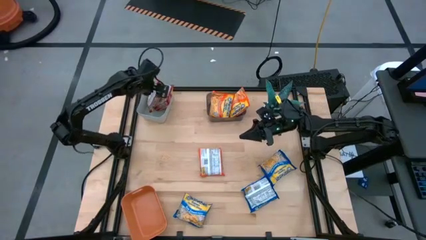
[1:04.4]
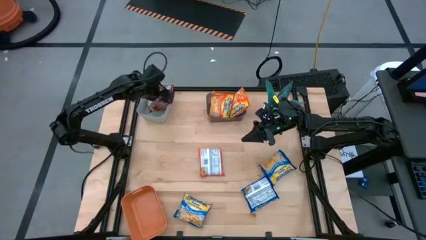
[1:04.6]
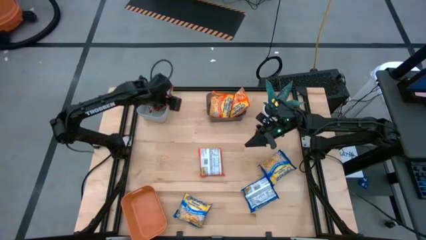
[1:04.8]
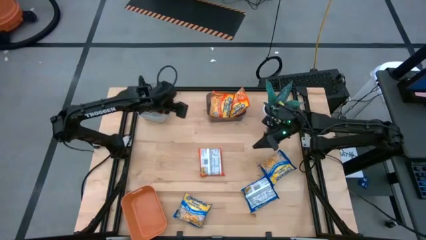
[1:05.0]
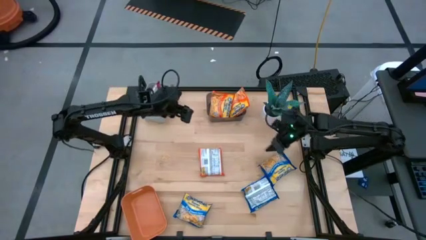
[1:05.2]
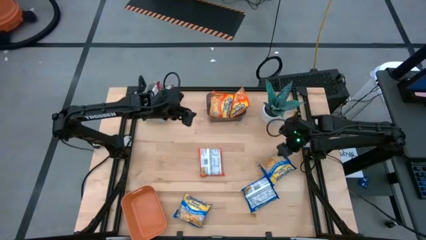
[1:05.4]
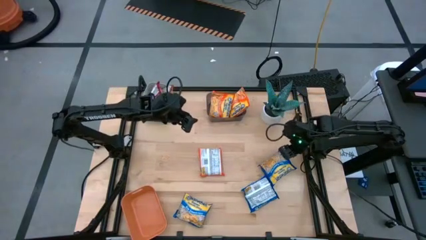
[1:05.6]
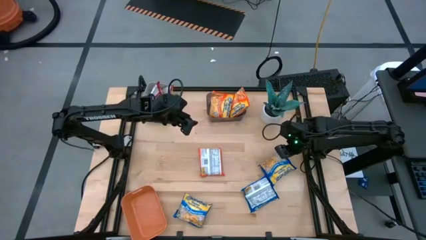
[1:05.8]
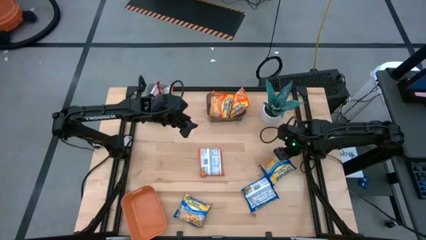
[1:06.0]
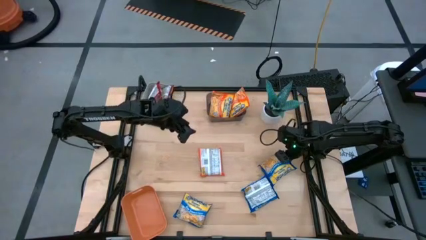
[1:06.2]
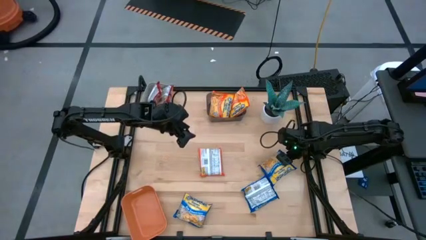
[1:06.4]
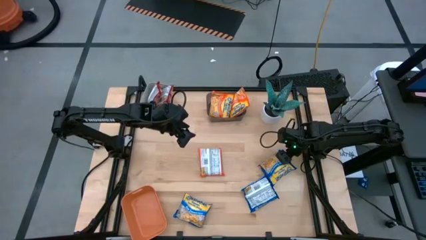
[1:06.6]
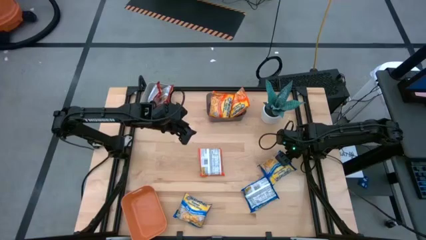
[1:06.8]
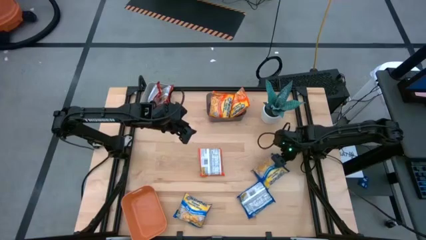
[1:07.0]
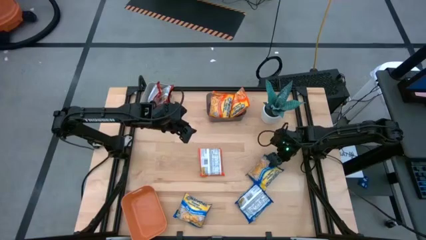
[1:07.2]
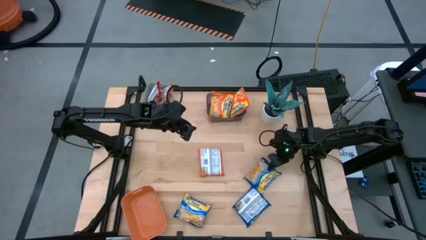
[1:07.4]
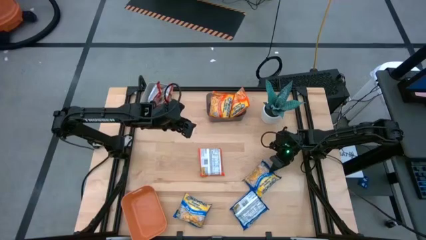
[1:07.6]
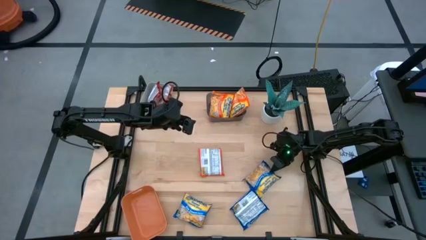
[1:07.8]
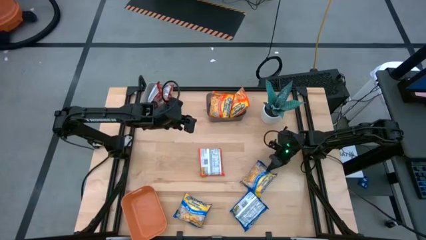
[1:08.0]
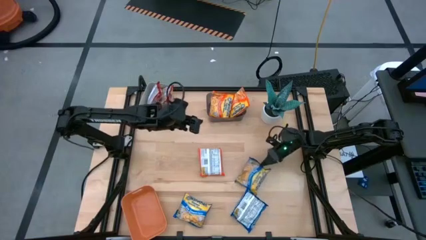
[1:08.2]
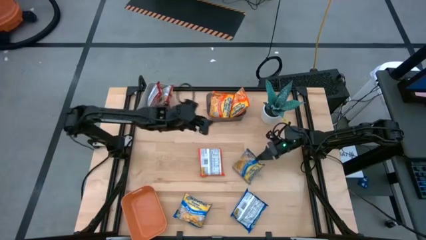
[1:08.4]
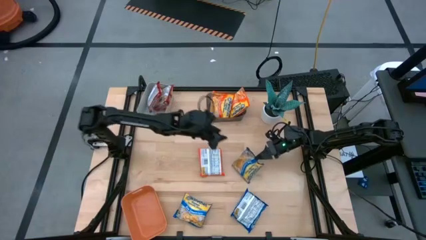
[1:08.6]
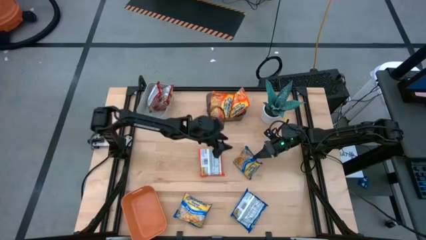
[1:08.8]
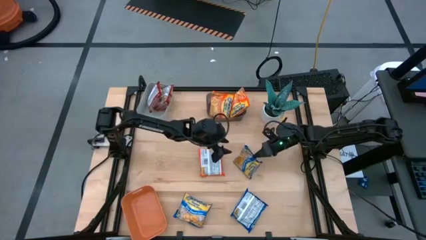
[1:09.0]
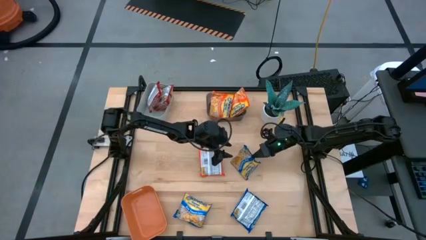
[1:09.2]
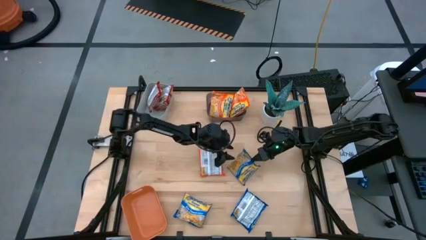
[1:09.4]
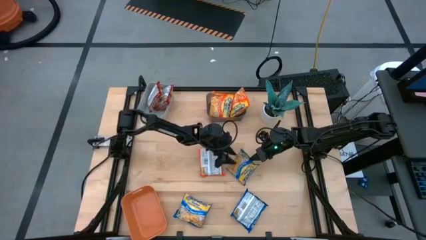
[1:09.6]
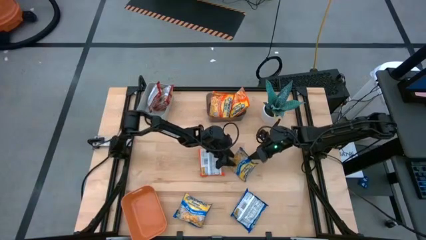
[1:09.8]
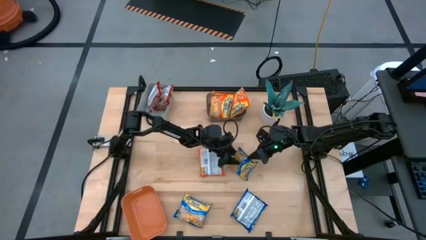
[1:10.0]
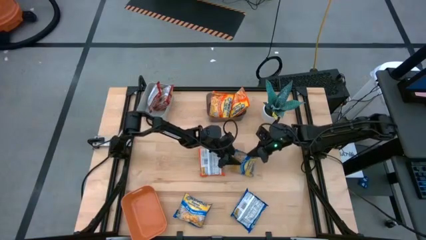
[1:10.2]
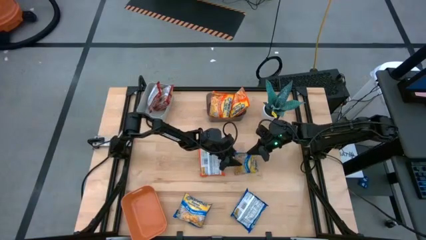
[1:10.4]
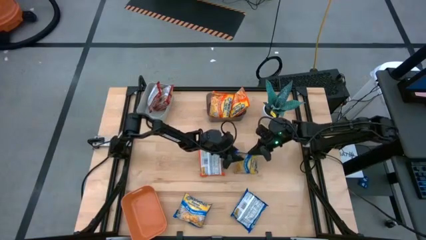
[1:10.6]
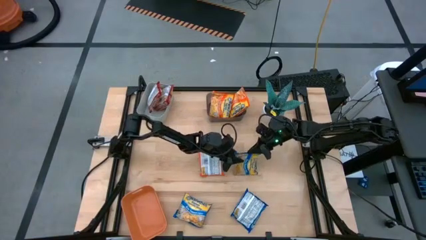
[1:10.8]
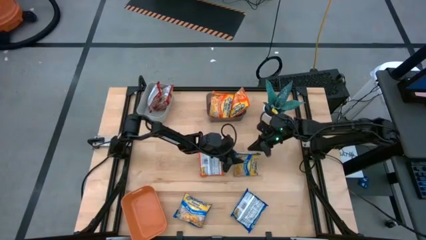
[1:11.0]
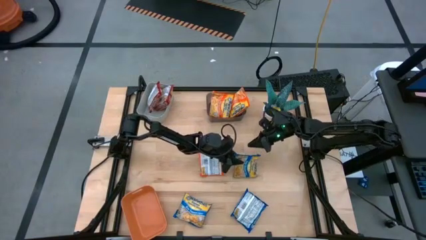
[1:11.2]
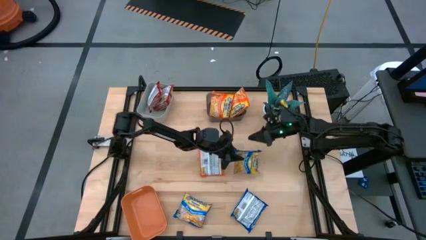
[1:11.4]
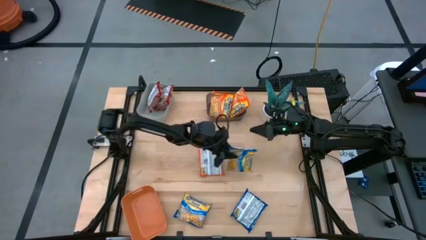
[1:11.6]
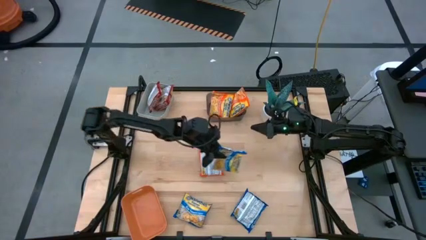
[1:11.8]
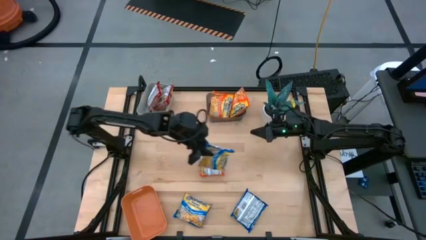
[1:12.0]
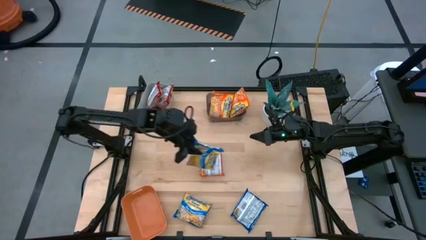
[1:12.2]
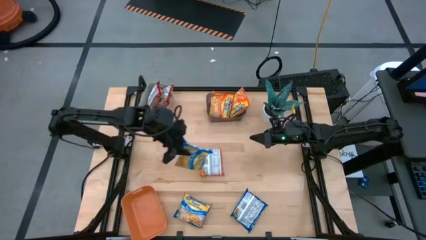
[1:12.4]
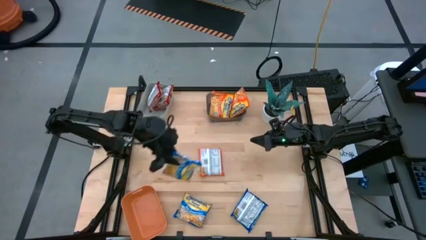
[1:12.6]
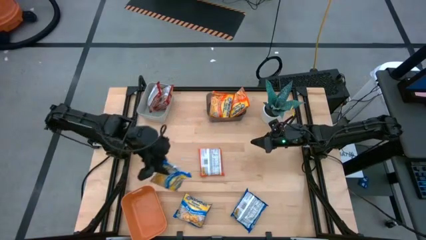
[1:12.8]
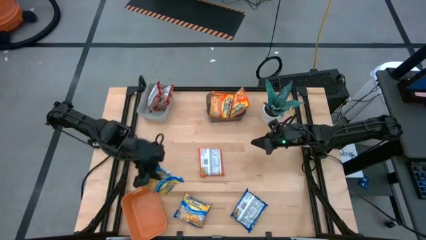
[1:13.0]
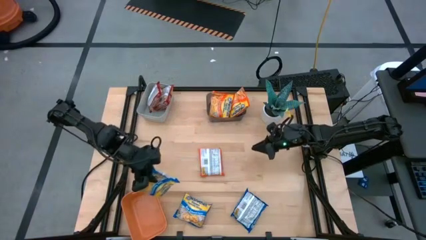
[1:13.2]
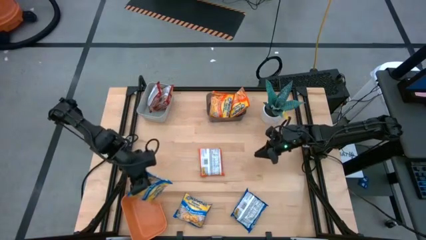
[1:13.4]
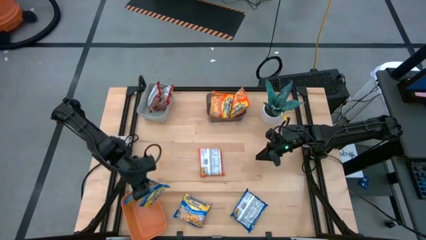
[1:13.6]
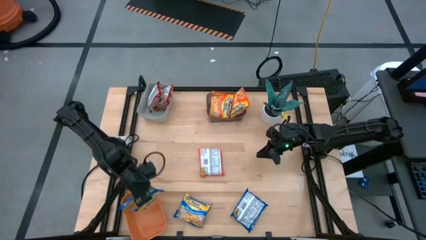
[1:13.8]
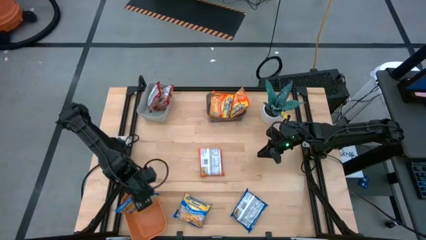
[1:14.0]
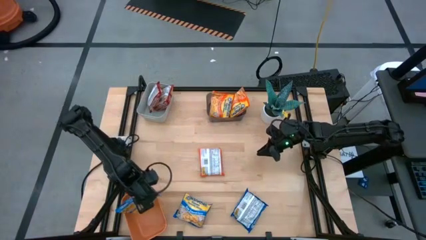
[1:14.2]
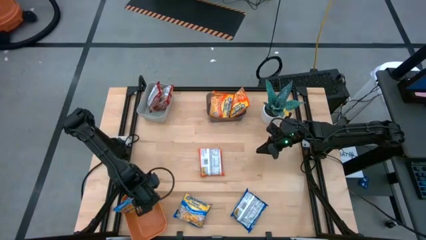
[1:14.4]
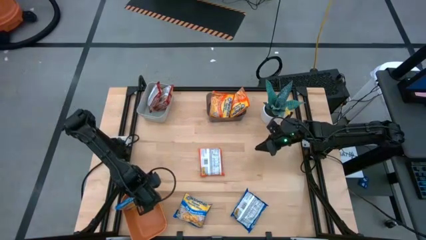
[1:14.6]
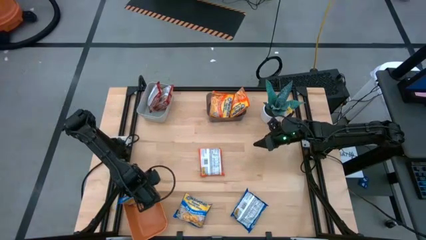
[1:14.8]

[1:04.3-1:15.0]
Task: Sort Maruchan noodles
Put the top right blue noodle pack into the orange bin

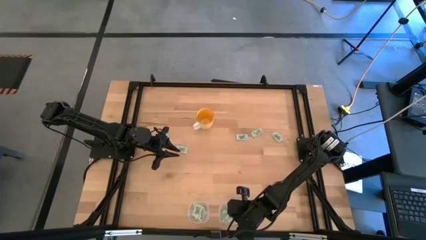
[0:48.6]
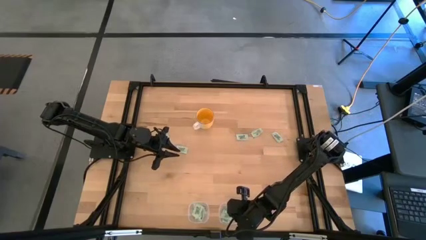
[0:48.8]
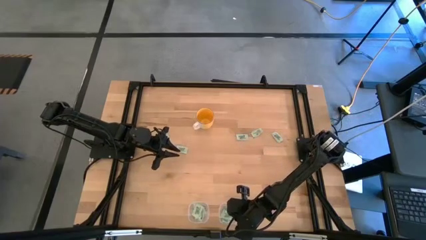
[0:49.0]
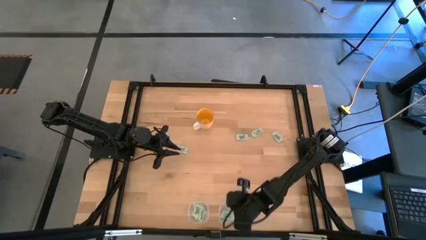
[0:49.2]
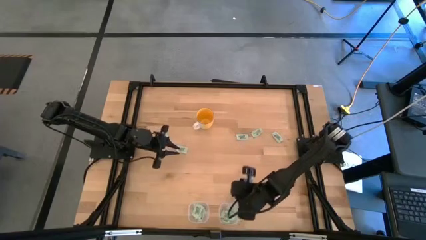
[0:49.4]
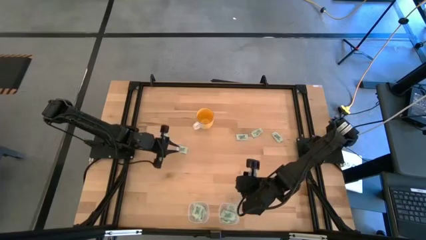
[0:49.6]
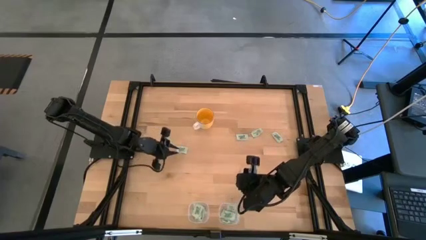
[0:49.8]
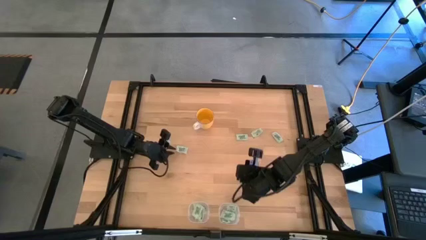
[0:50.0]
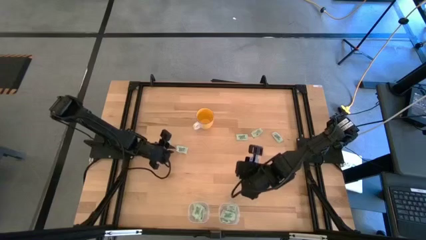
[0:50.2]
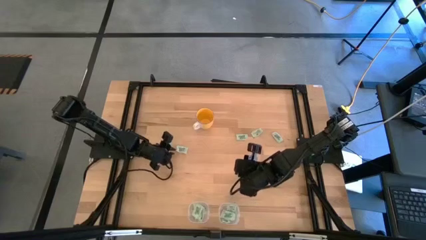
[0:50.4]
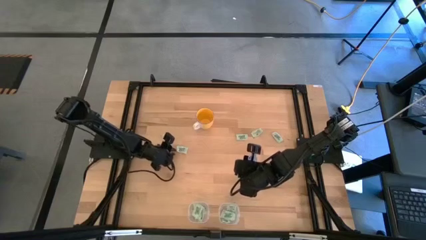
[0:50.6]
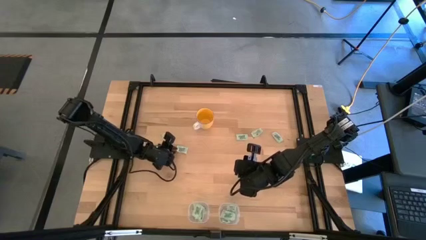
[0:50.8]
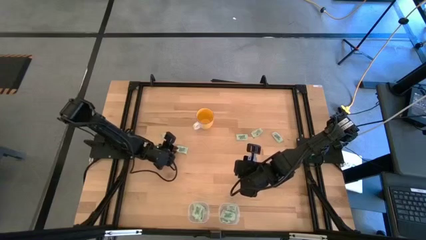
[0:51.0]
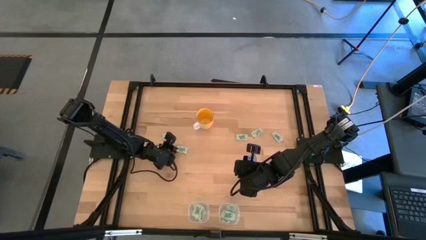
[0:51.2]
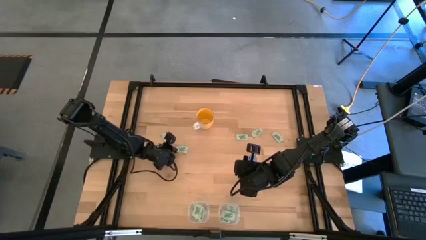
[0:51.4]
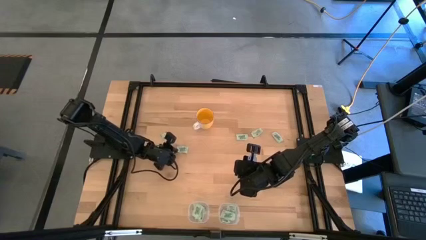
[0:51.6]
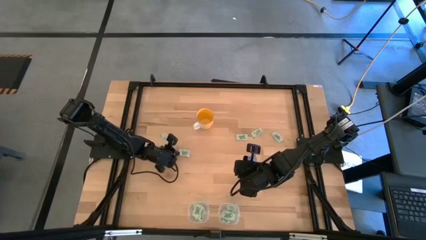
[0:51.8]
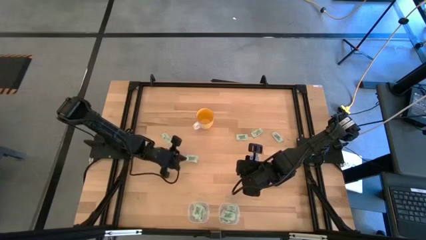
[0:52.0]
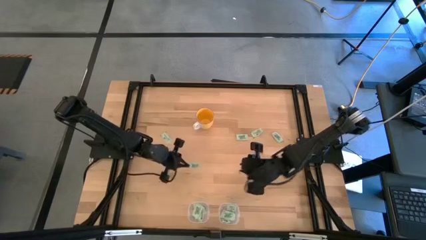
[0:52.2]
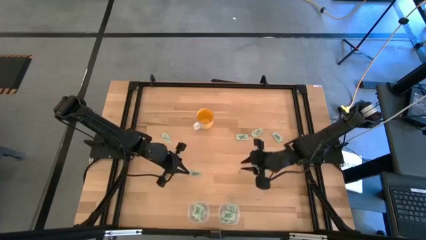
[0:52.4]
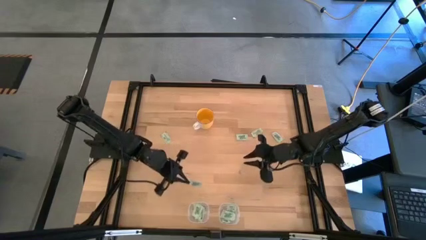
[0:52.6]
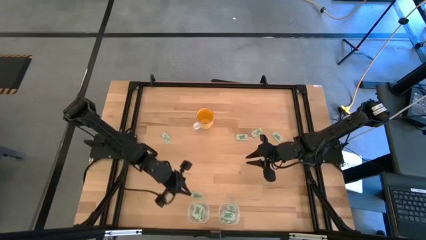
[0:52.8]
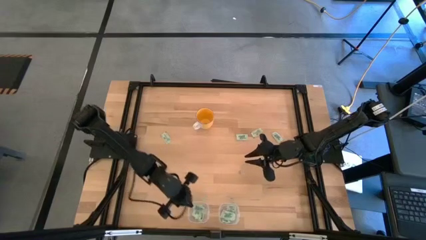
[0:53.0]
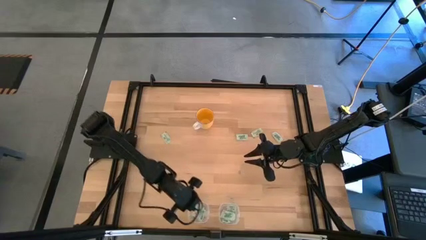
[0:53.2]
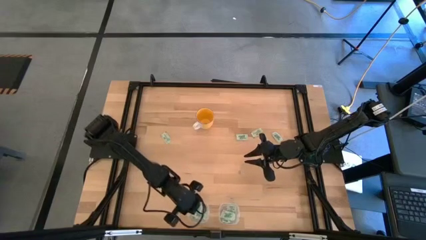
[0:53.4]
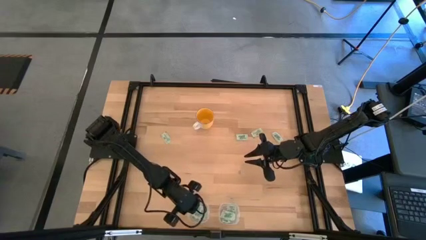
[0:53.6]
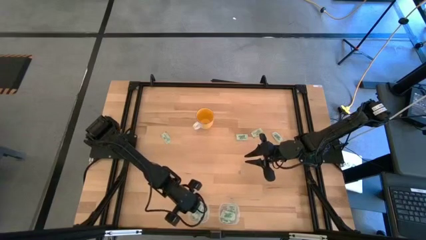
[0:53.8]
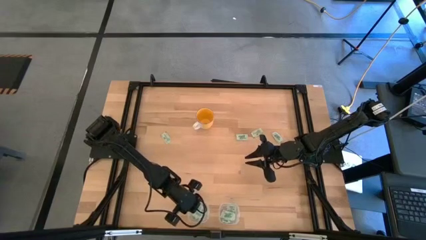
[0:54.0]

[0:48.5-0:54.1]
Task: Pick and place items into bin
Put the green stevia packet into the left transparent bin
